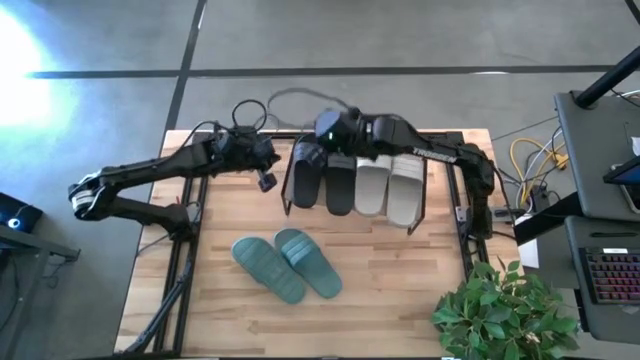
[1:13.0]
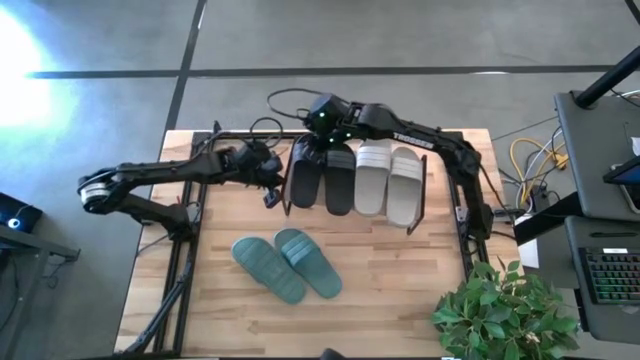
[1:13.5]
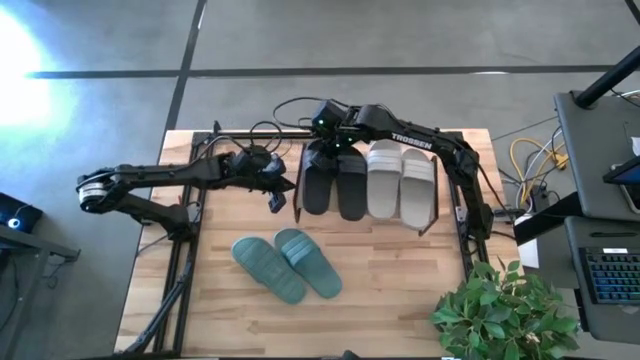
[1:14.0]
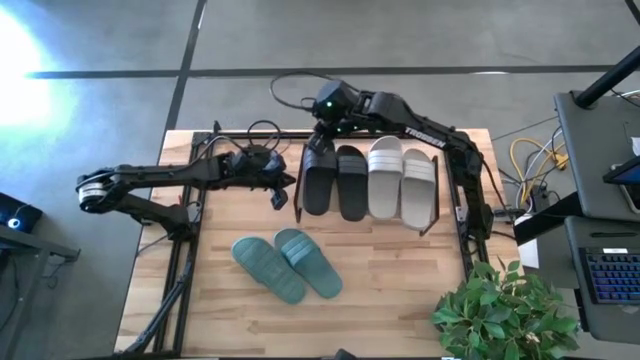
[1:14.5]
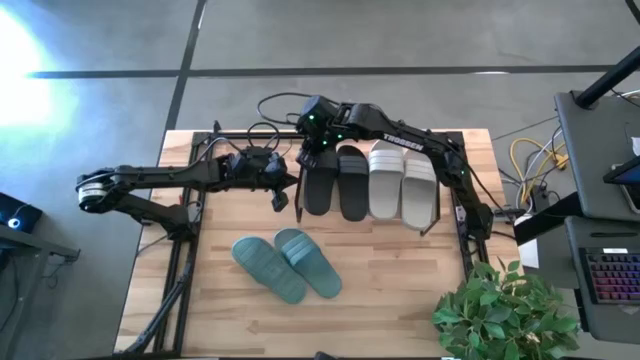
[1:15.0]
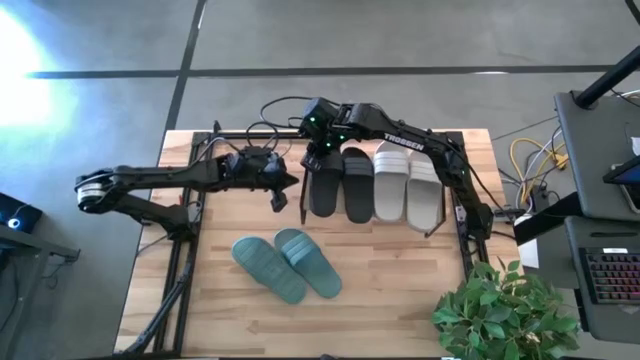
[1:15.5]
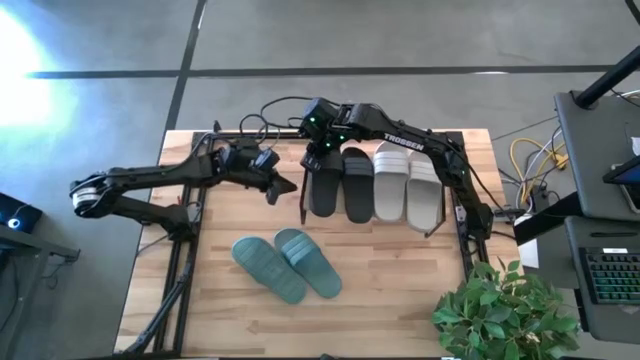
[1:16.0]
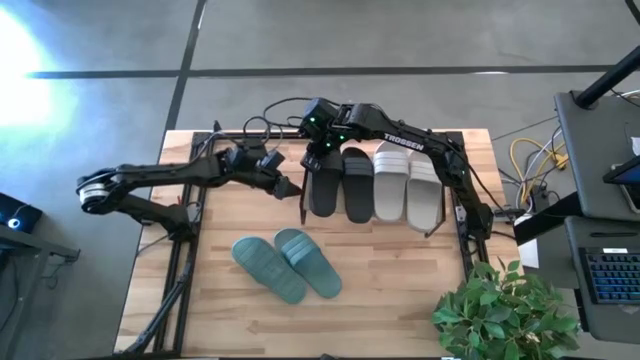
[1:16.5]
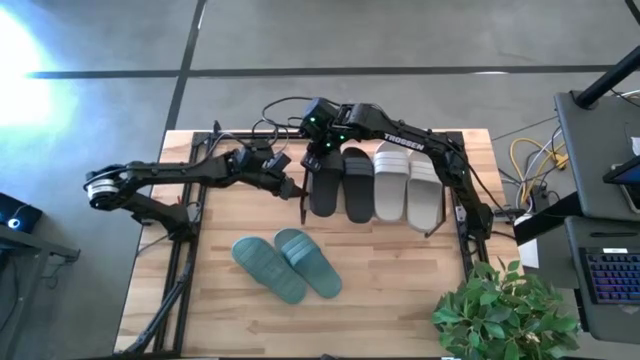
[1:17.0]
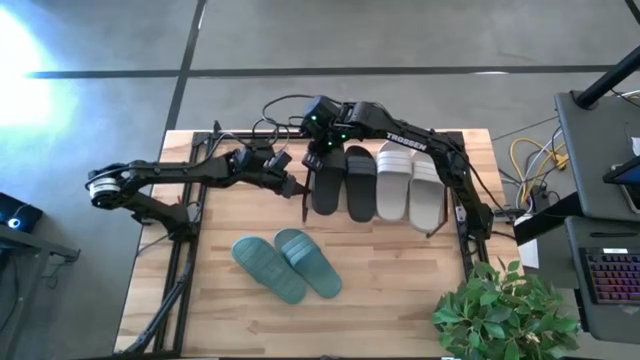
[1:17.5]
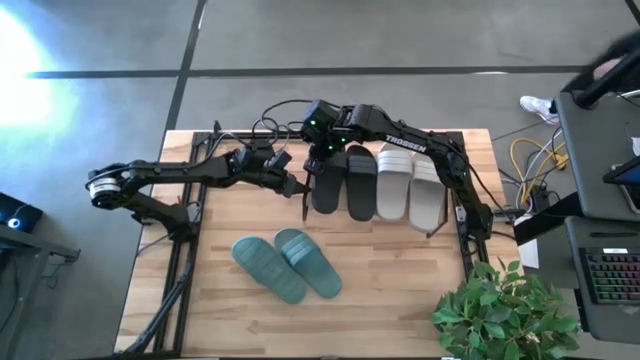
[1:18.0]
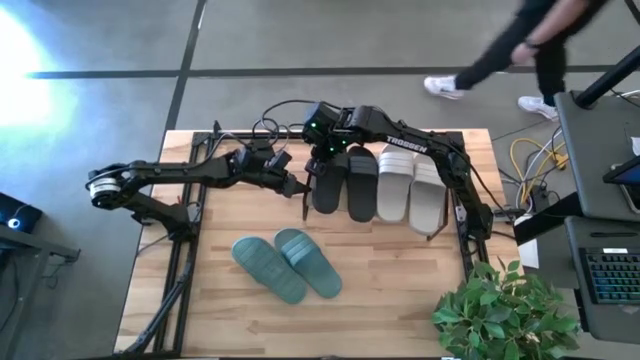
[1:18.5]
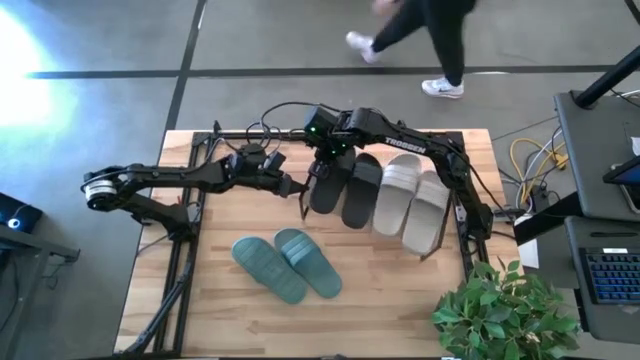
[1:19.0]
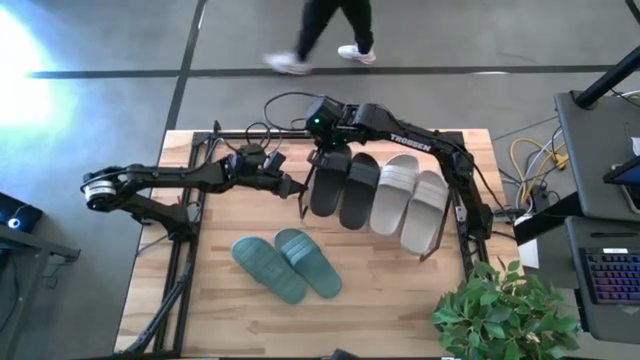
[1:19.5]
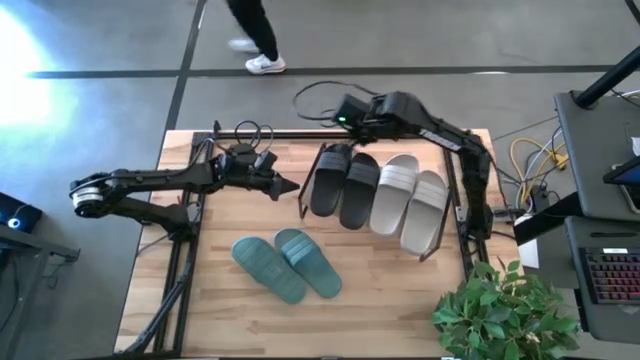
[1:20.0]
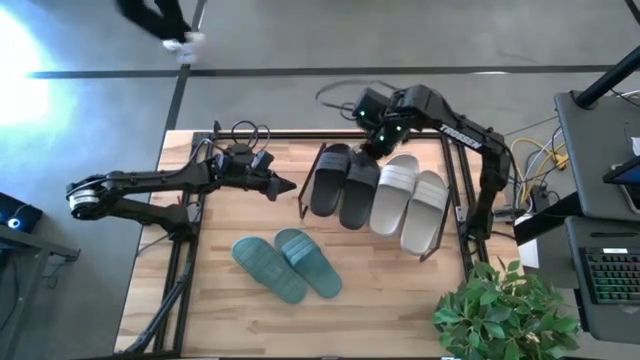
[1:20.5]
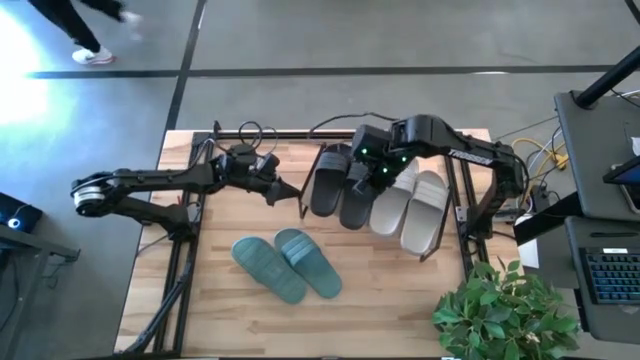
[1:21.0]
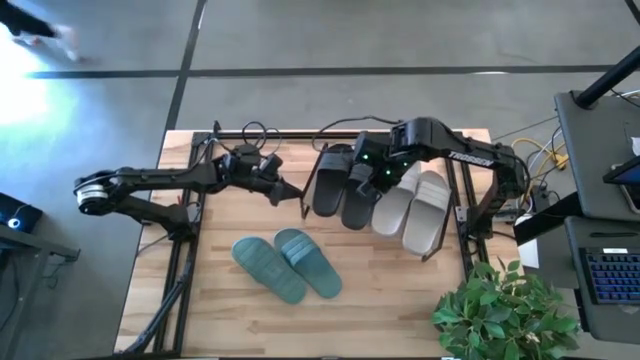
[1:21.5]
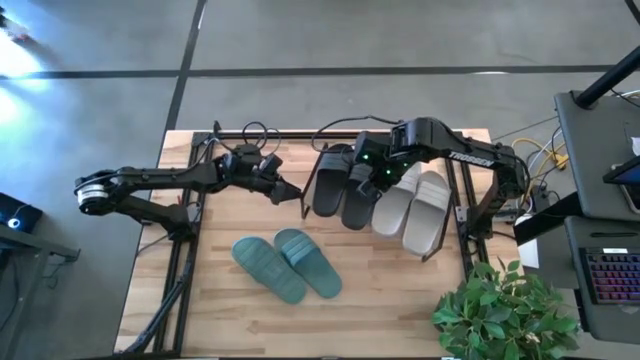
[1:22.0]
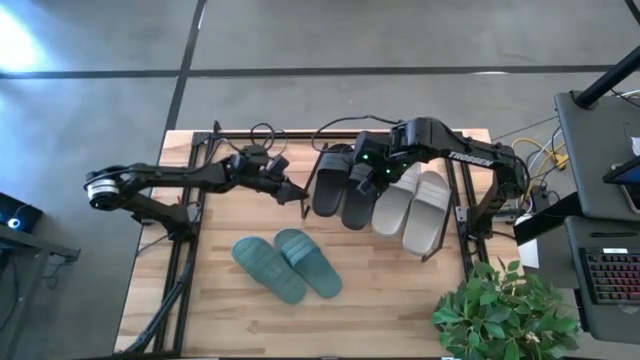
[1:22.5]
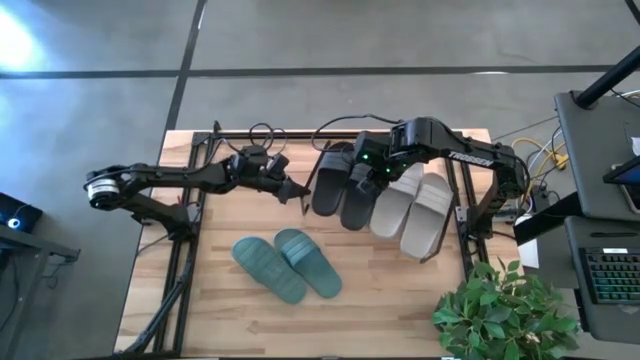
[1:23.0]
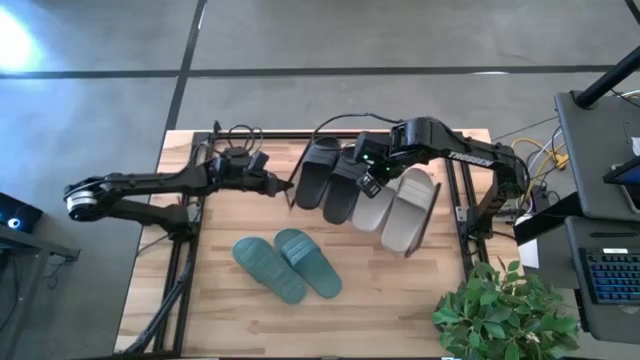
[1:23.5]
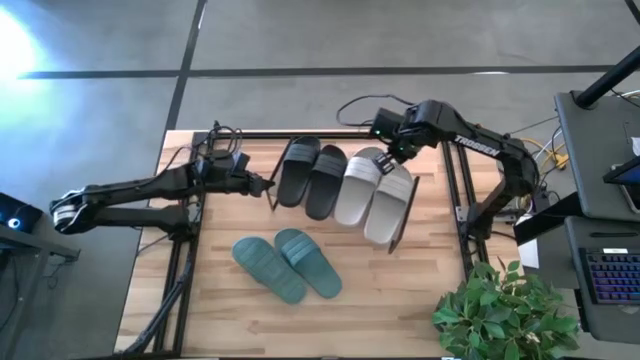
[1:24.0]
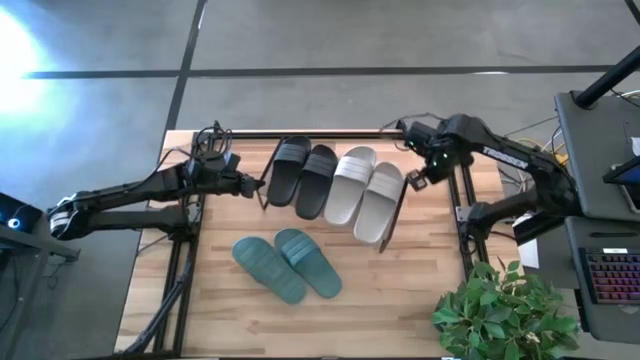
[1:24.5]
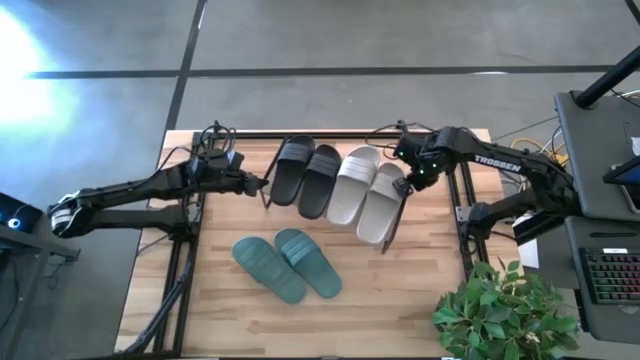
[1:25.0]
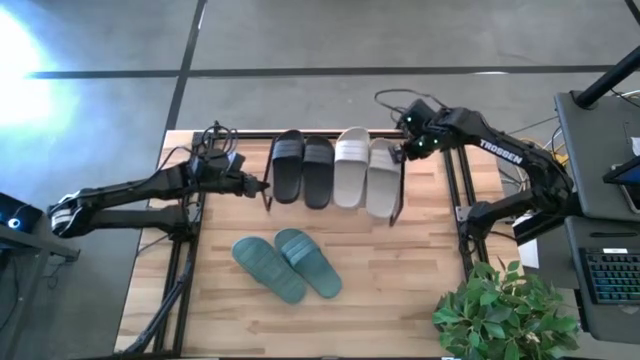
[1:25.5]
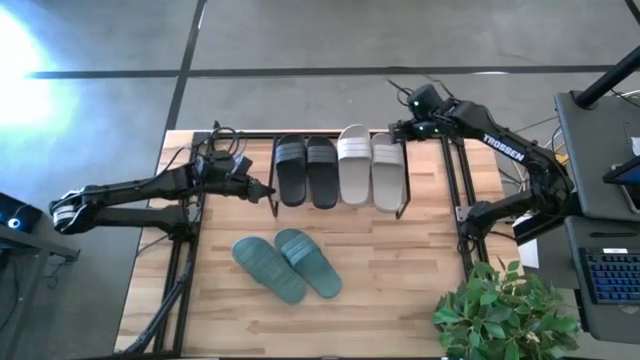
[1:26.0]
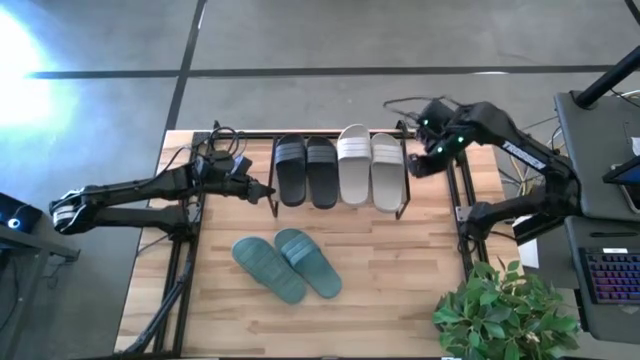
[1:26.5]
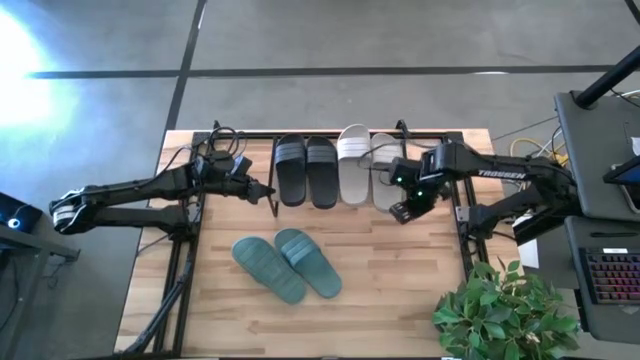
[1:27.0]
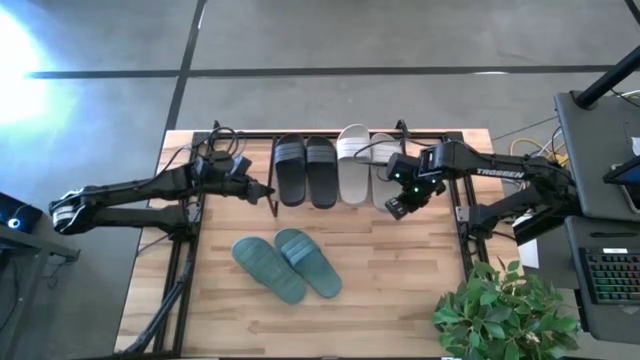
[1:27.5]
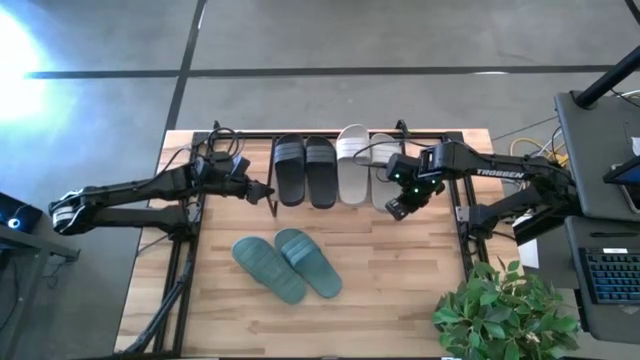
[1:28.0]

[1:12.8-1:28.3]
Task: Pick and place slides into the shelf
Adjust the shelf

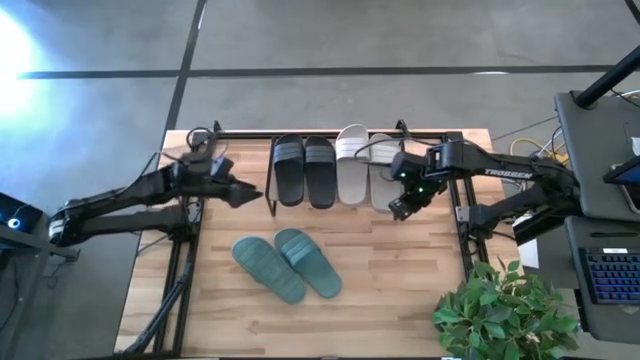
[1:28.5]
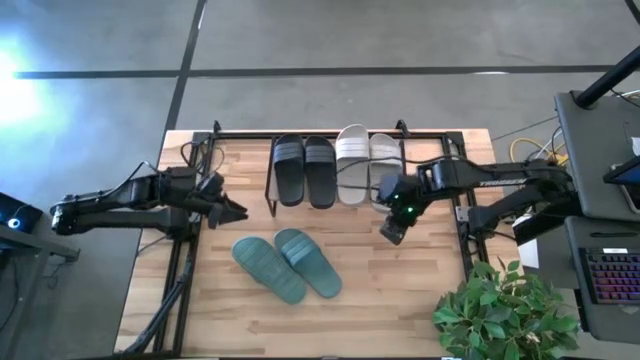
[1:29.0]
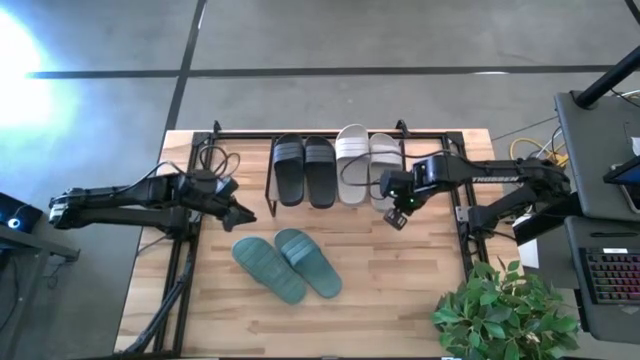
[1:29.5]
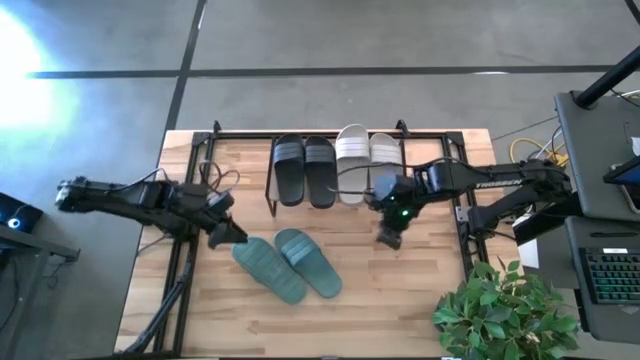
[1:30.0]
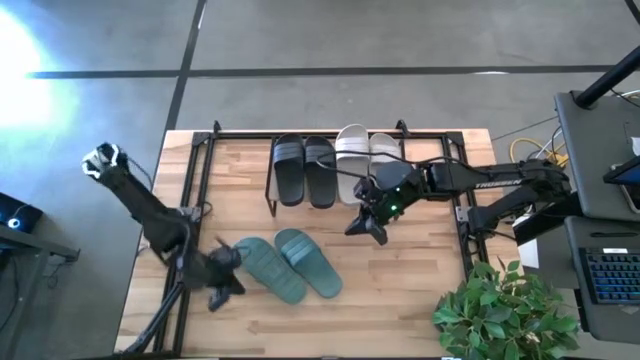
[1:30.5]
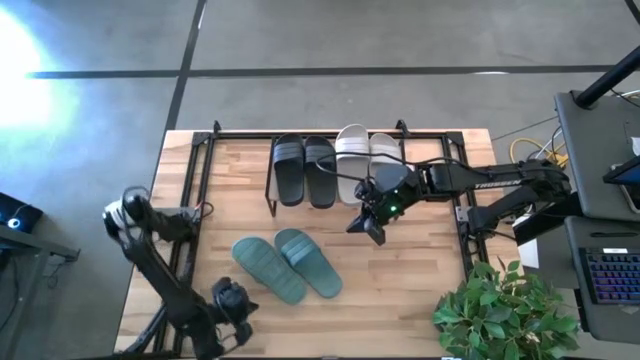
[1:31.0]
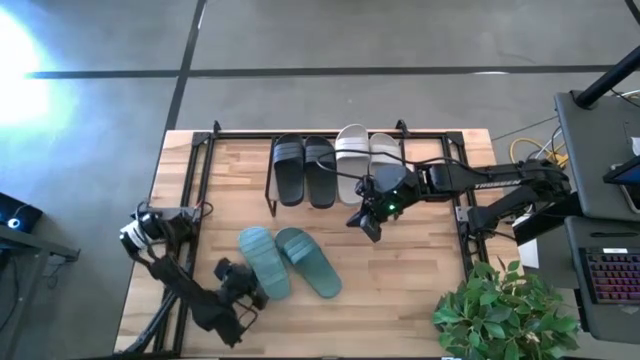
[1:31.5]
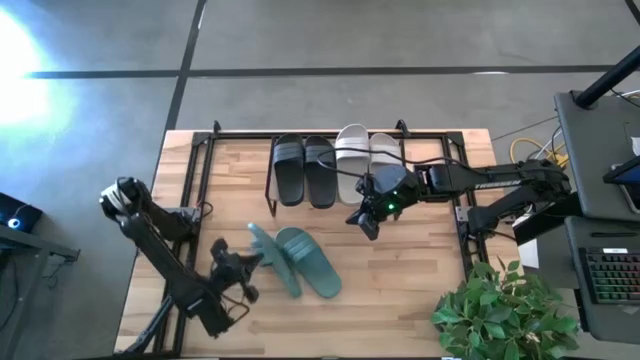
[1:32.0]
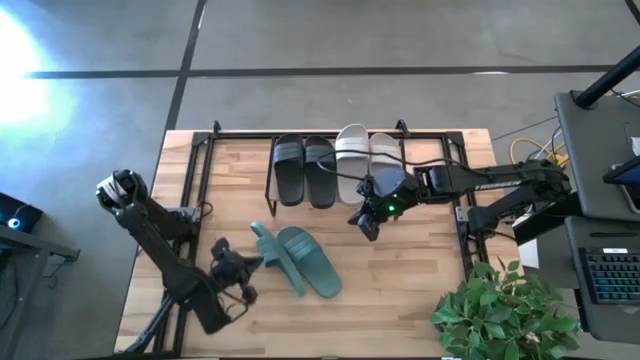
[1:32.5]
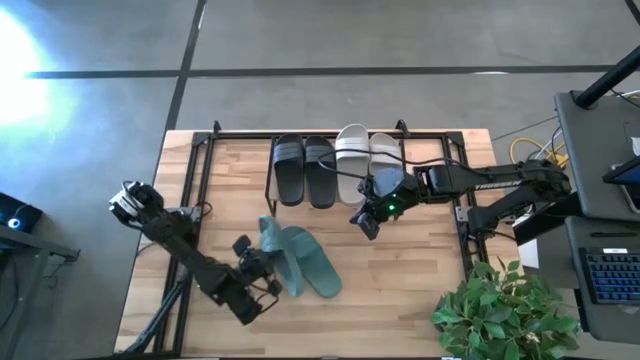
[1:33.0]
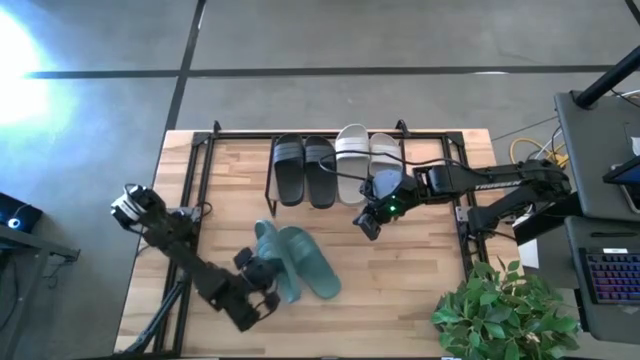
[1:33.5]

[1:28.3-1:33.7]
Adjust the left green slide
